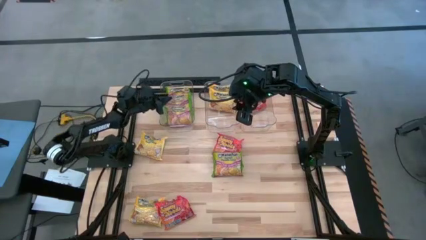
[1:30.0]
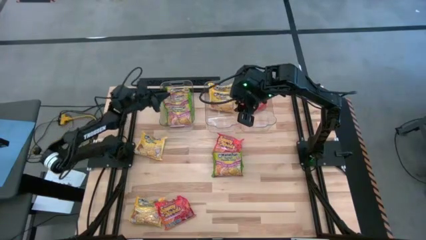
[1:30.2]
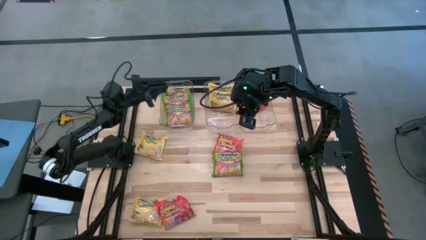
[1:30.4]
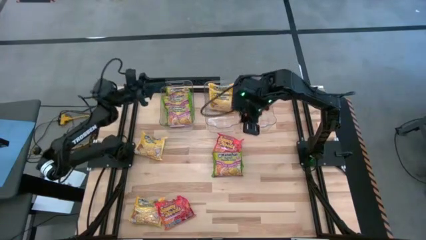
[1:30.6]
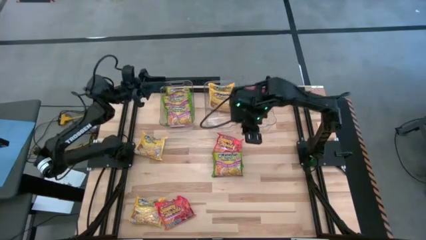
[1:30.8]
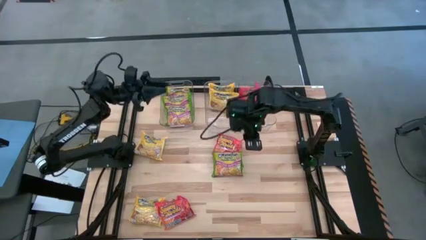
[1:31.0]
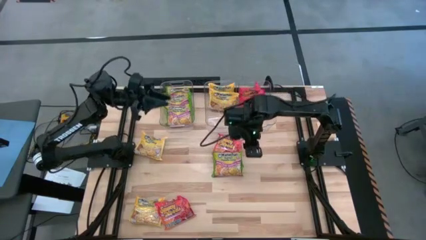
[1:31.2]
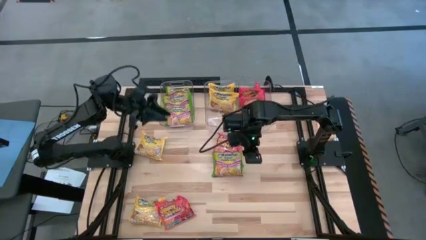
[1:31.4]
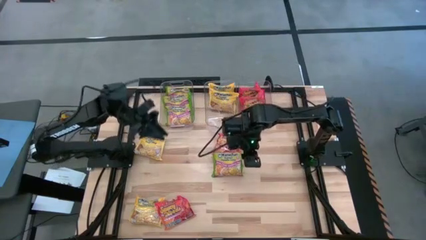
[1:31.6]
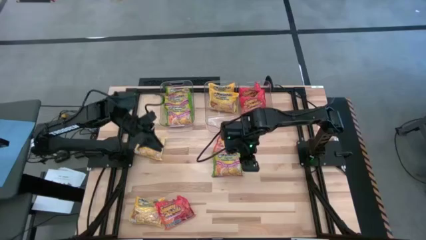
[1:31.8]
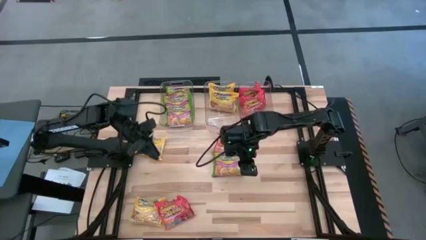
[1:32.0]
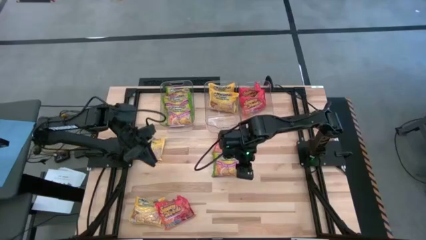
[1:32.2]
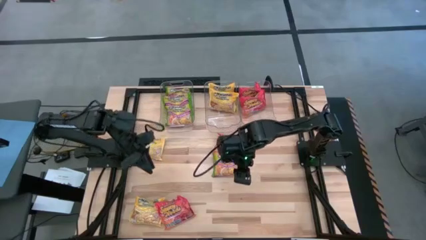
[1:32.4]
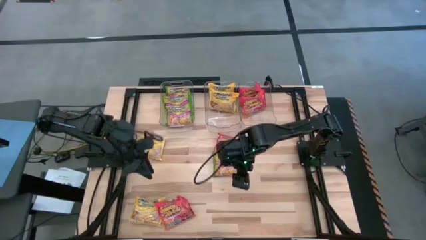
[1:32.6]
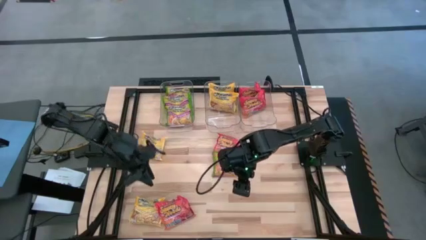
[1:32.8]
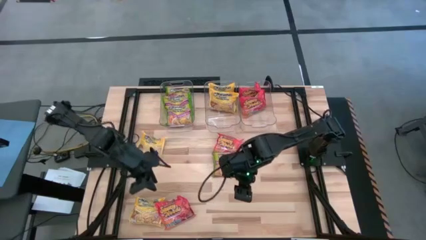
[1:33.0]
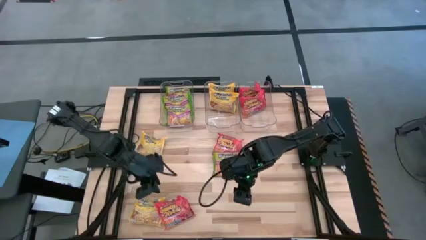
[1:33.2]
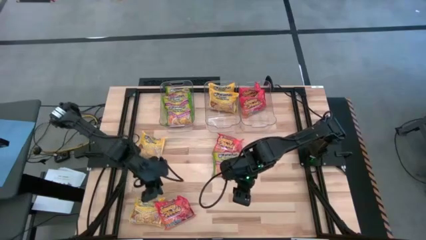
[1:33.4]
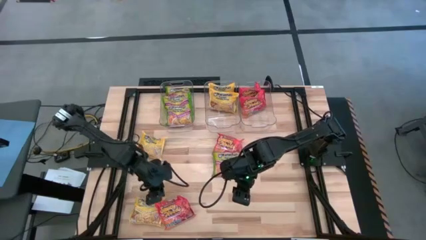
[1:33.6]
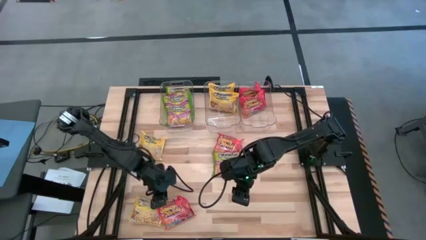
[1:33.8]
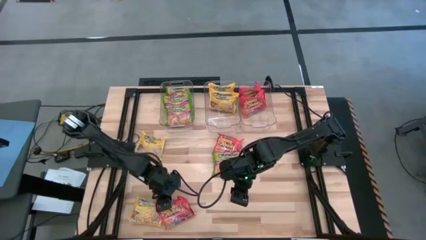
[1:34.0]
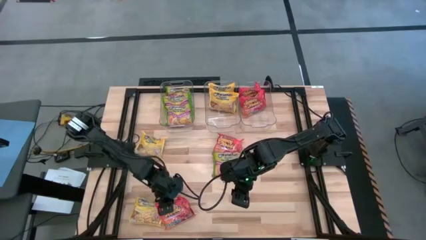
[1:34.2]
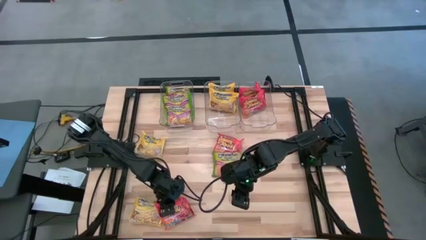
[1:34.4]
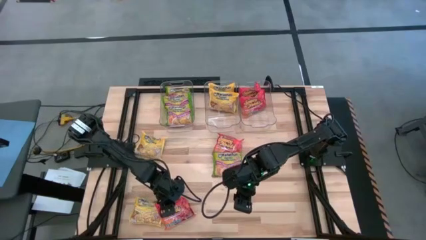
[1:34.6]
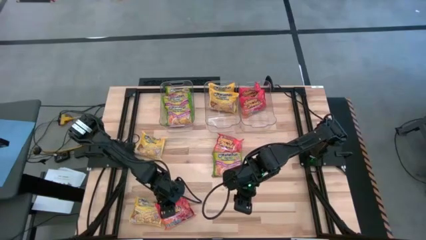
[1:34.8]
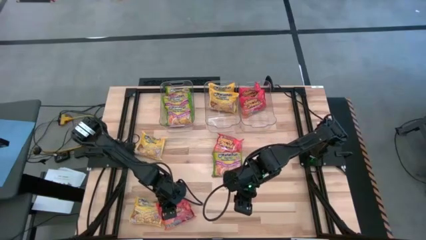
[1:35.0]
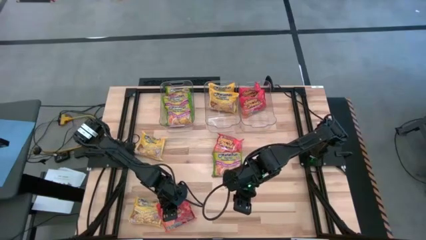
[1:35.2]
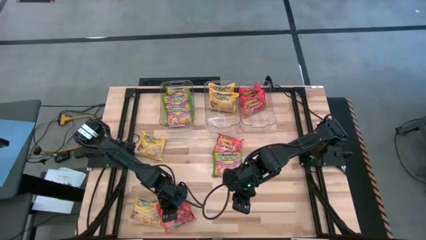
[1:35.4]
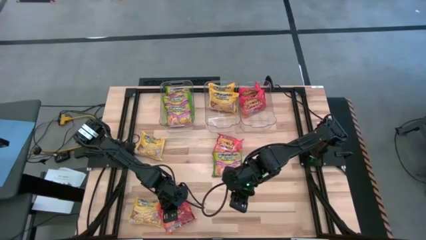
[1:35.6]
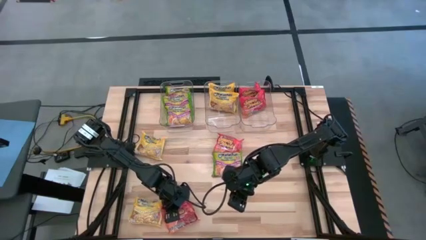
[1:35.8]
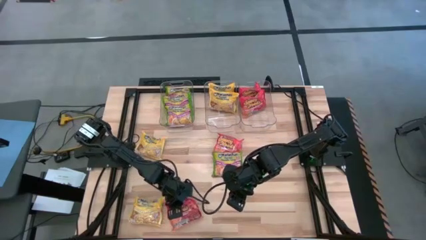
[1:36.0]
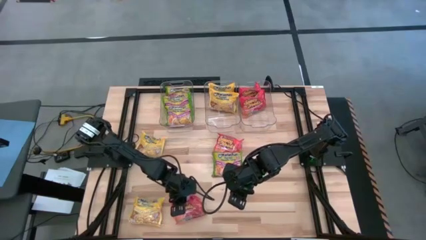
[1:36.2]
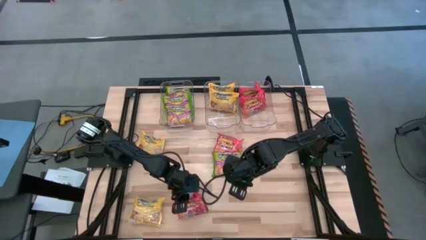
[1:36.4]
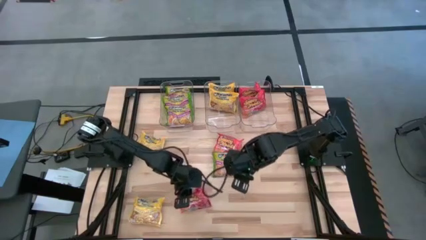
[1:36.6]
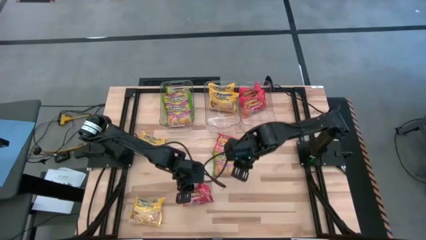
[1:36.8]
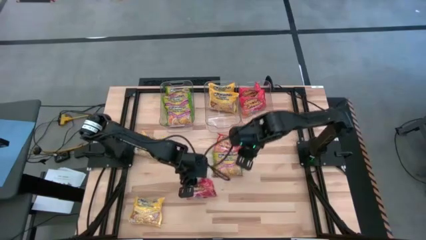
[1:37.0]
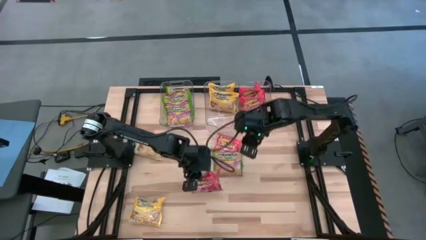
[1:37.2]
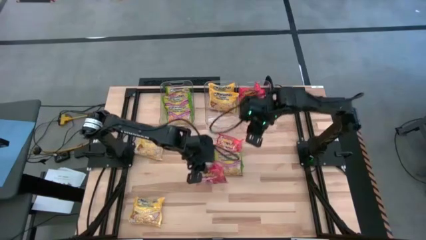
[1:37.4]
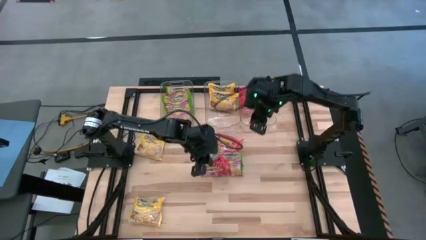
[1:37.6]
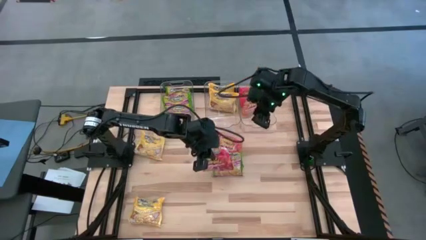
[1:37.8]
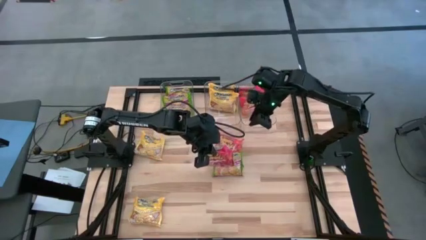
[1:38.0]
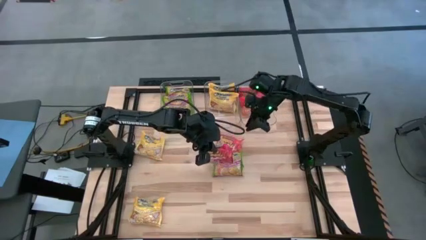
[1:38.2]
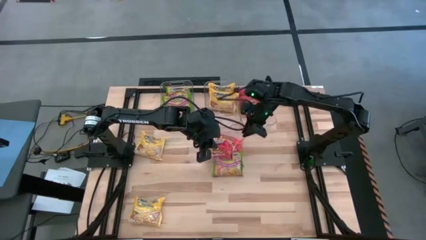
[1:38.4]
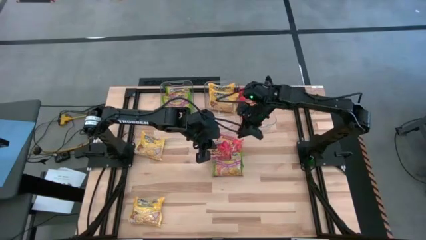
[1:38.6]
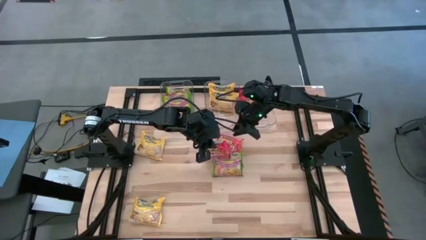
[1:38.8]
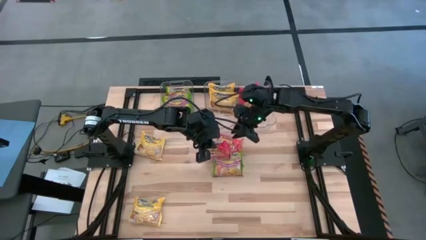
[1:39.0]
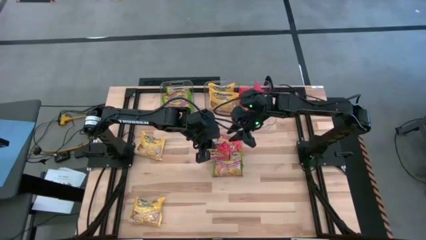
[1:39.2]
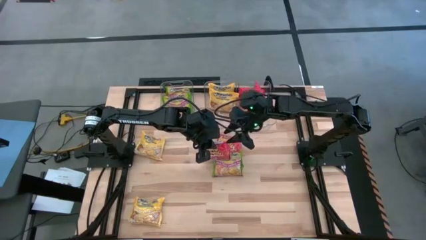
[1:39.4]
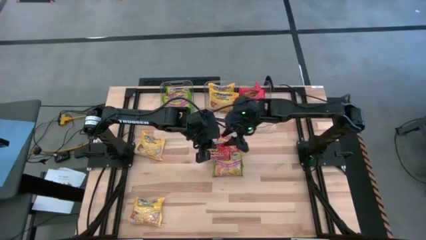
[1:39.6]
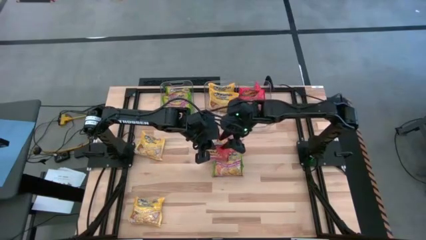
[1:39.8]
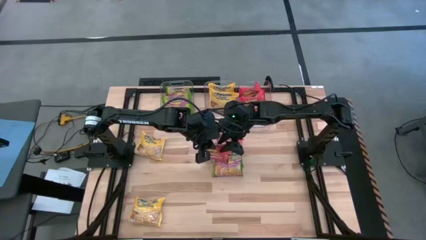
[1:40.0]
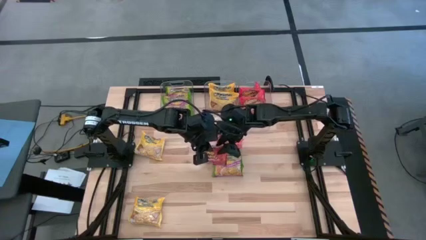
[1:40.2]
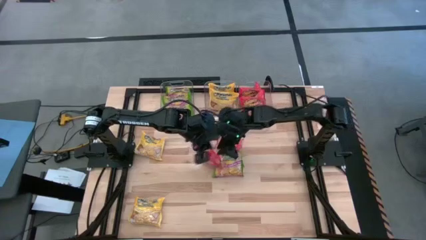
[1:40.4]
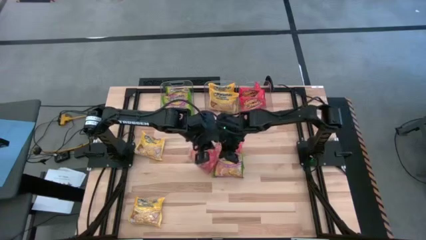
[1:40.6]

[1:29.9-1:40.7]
Task: Sort Maruchan noodles
Put the red noodle pack into the right transparent bin

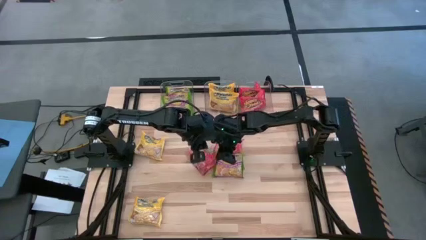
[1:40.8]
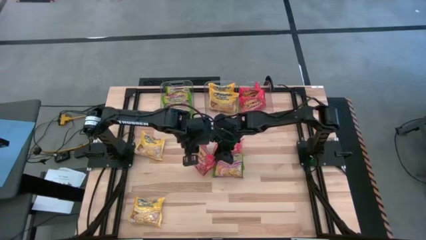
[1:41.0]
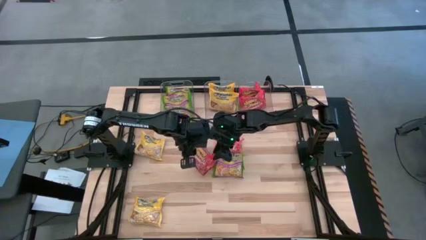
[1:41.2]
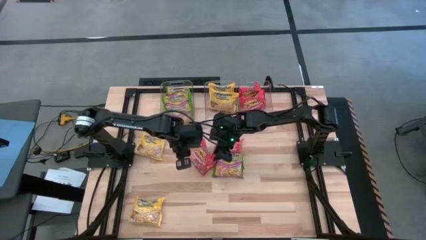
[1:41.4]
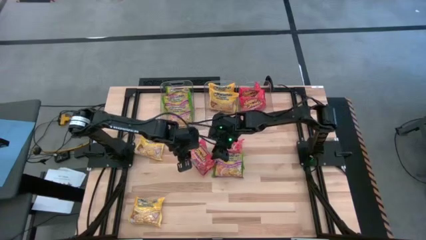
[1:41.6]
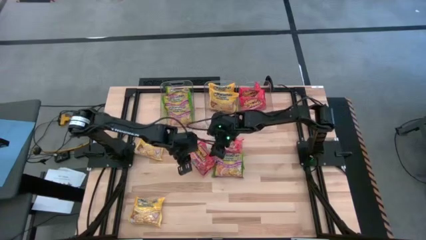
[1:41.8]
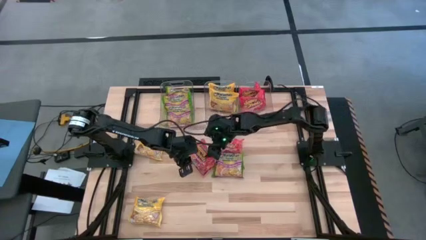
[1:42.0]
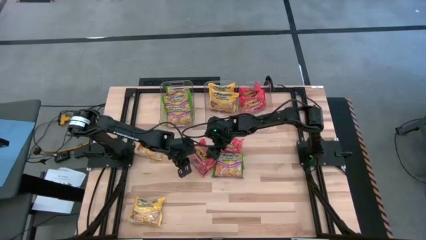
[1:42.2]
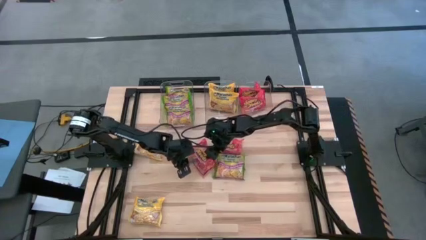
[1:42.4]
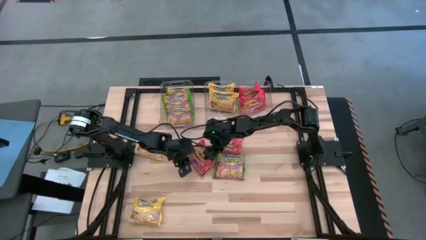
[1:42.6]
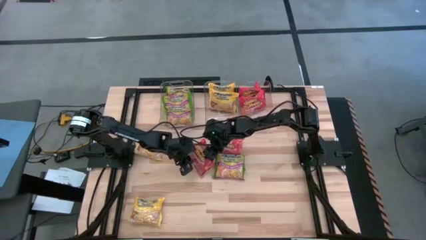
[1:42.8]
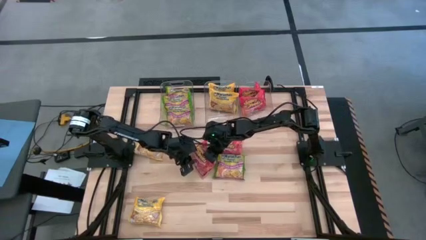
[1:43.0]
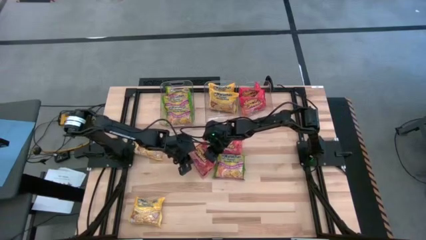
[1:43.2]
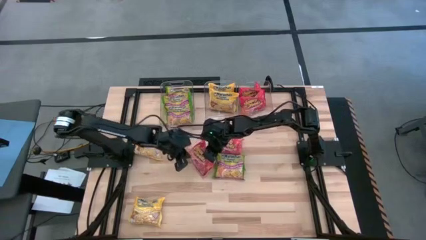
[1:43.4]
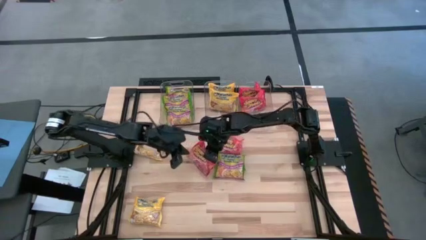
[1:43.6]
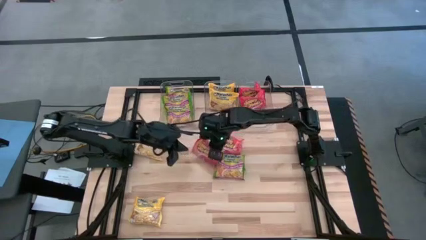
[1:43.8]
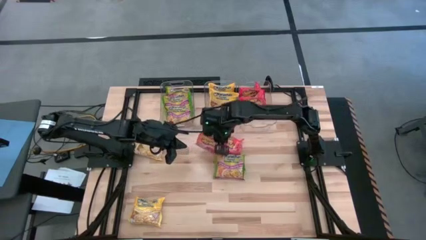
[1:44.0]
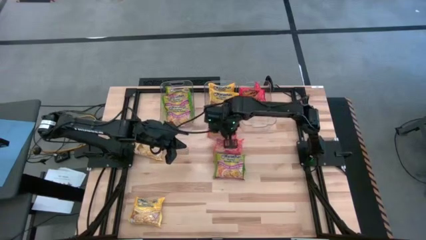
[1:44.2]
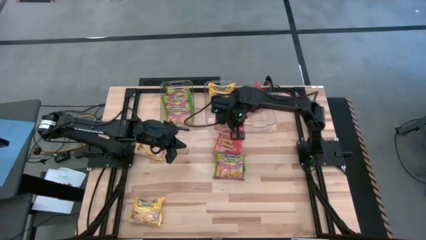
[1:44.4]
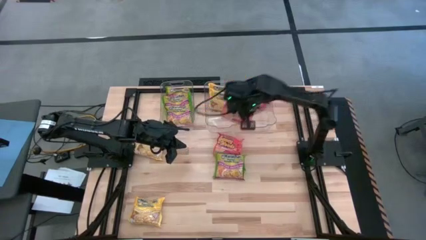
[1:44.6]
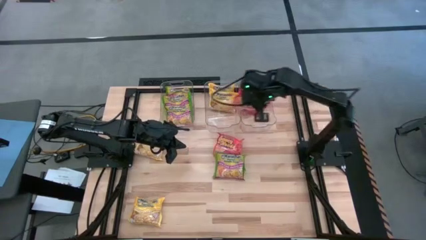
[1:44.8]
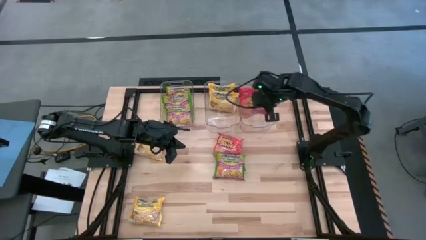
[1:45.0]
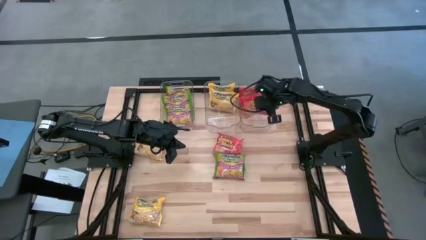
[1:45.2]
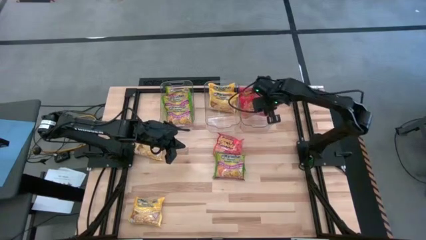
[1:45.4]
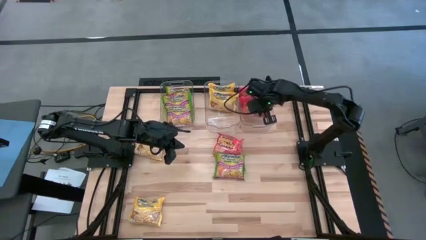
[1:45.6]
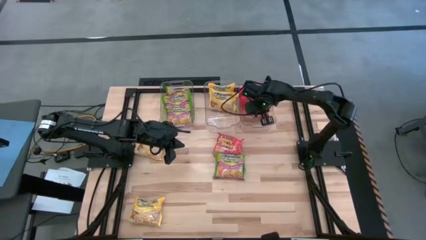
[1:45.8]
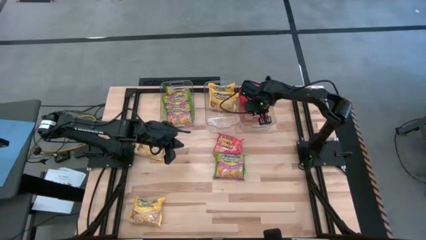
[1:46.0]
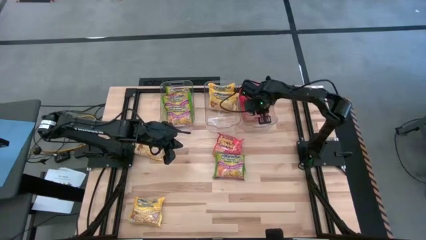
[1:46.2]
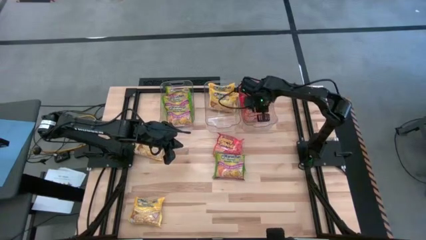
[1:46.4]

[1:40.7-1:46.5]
Put the red noodle pack into the right transparent bin
